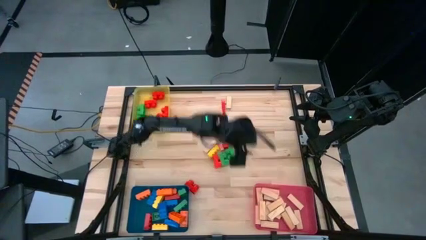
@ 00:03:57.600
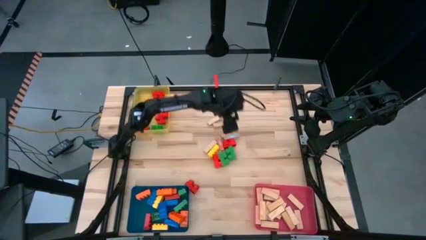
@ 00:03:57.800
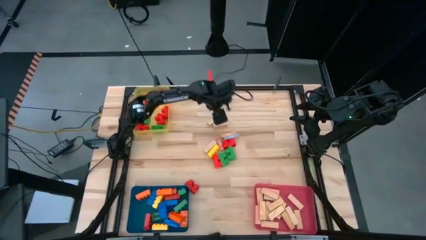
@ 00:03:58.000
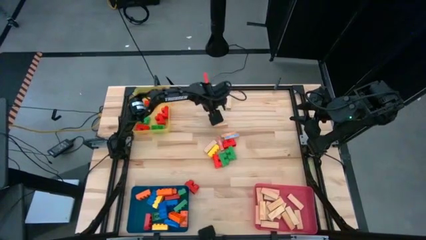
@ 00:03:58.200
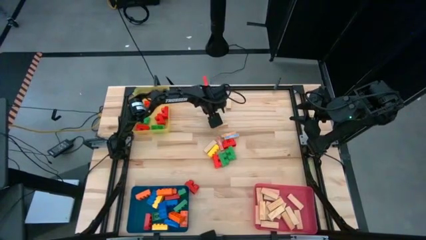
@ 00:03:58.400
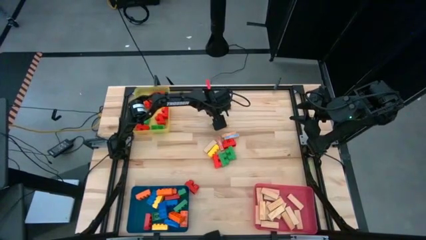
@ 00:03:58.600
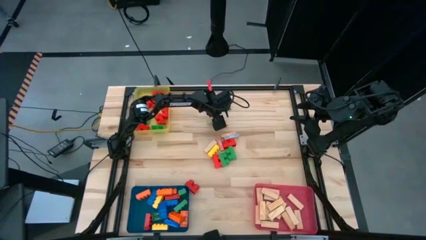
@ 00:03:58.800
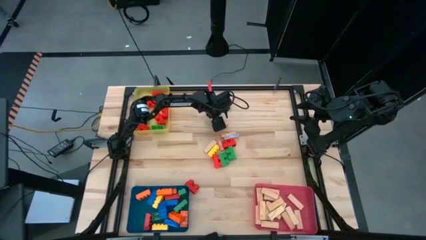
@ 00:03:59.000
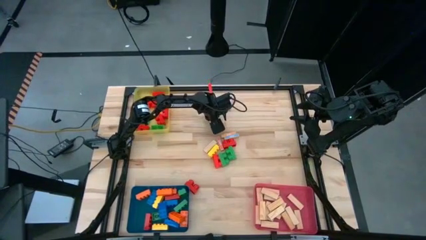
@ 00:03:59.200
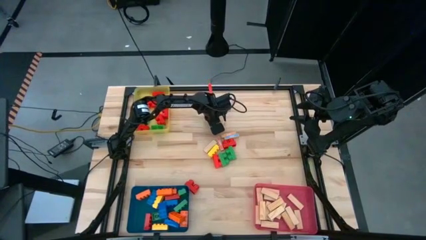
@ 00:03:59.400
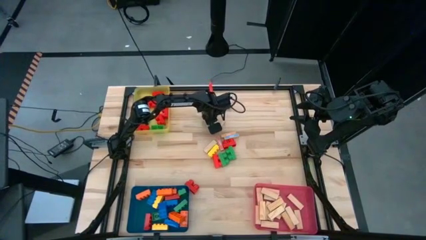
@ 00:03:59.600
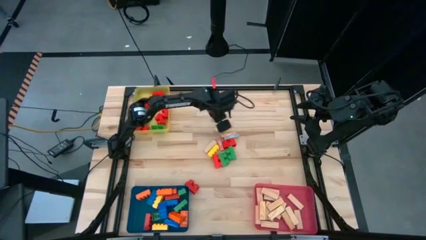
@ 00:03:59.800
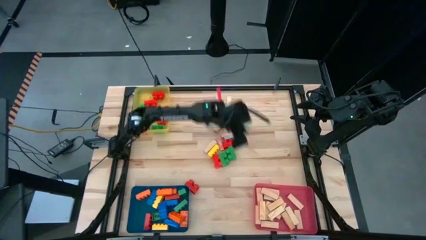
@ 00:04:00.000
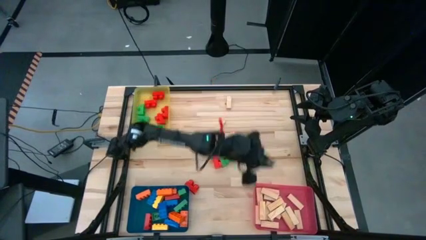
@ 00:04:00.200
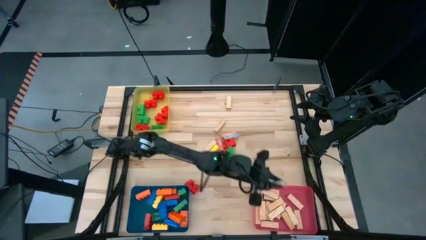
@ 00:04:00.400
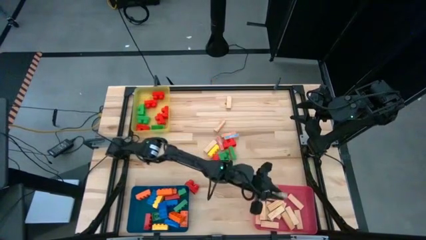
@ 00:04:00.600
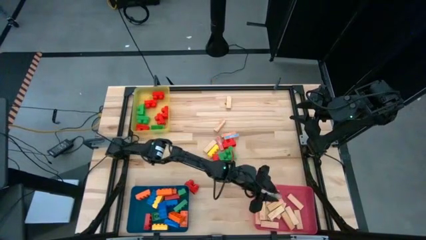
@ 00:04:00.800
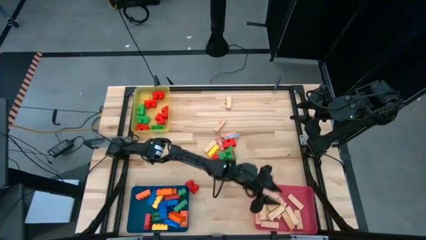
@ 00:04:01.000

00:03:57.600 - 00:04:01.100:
Task: Sort blocks by size
Put the wooden block into the red bin

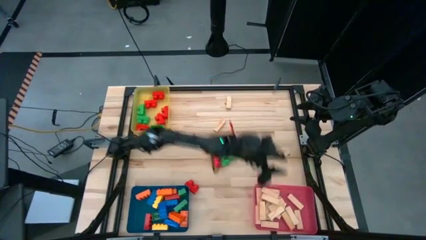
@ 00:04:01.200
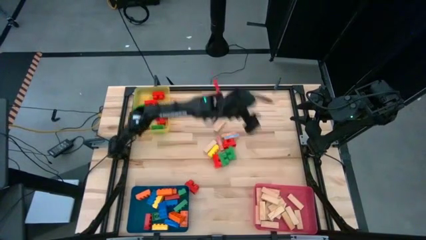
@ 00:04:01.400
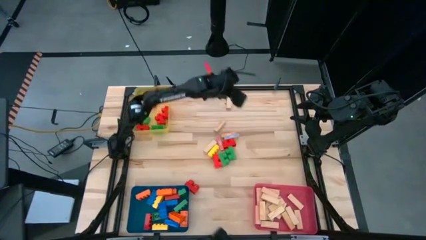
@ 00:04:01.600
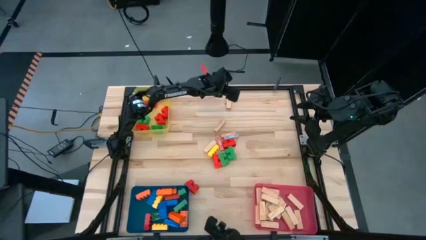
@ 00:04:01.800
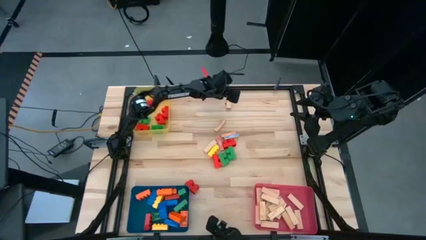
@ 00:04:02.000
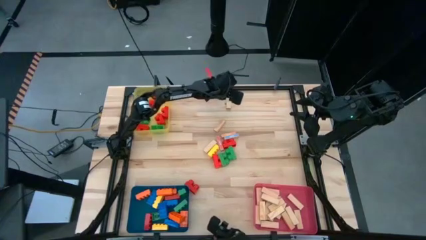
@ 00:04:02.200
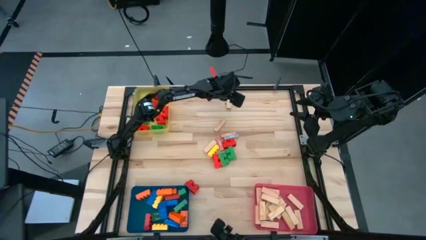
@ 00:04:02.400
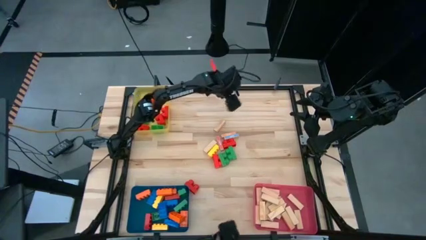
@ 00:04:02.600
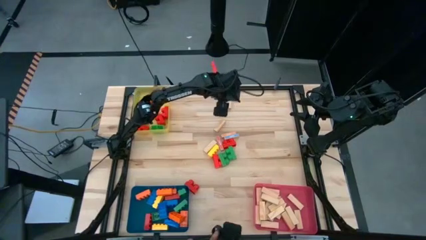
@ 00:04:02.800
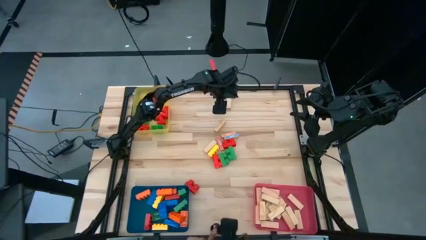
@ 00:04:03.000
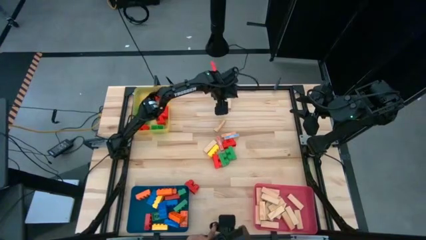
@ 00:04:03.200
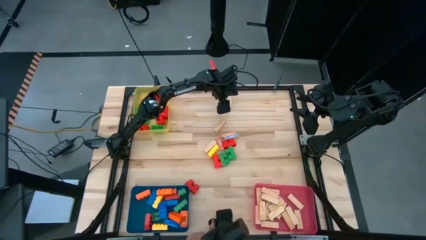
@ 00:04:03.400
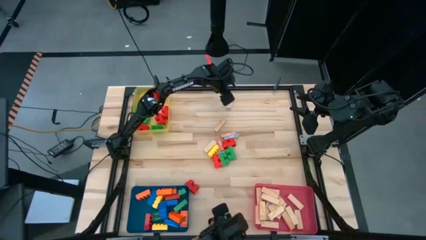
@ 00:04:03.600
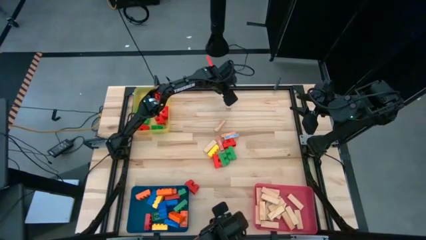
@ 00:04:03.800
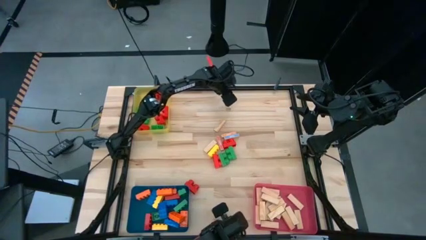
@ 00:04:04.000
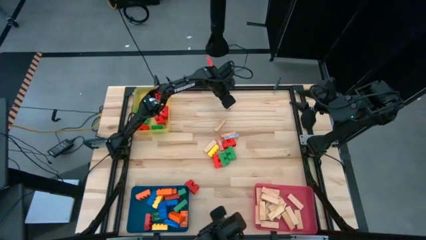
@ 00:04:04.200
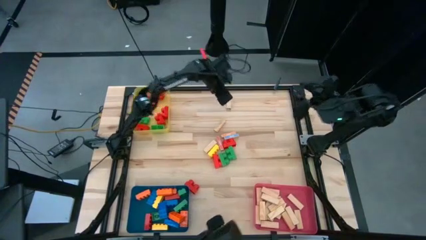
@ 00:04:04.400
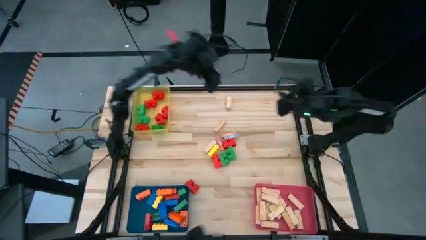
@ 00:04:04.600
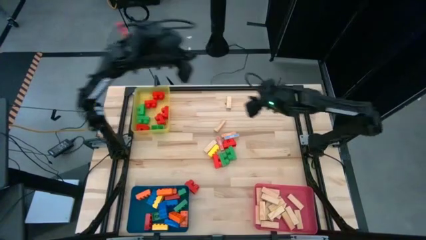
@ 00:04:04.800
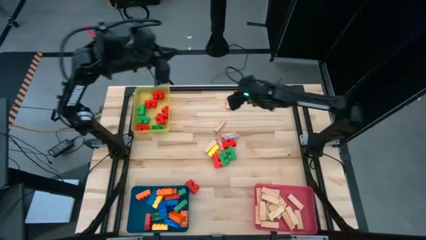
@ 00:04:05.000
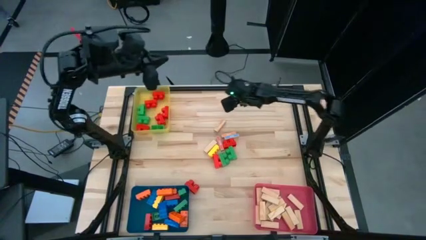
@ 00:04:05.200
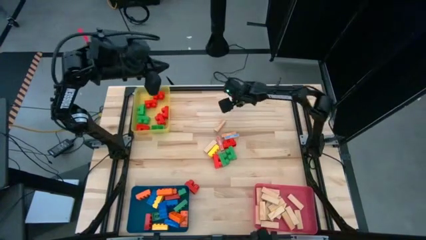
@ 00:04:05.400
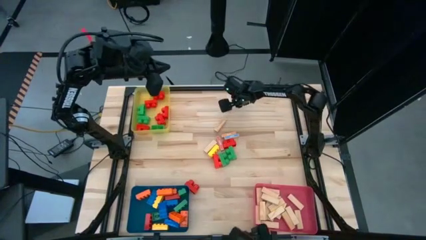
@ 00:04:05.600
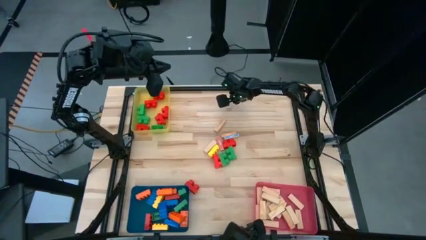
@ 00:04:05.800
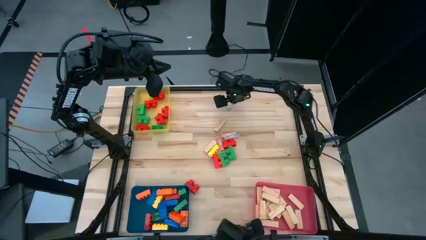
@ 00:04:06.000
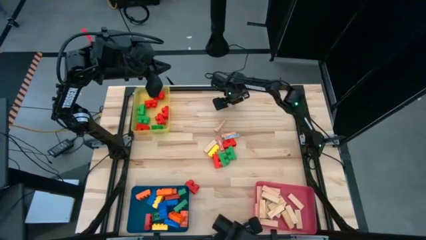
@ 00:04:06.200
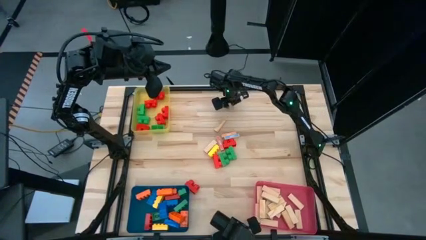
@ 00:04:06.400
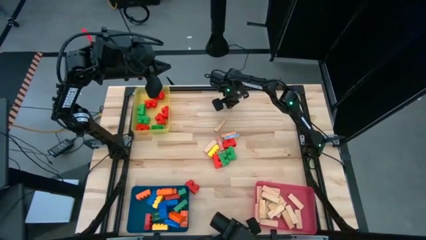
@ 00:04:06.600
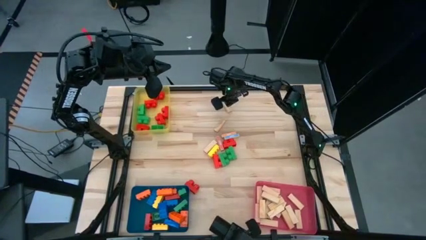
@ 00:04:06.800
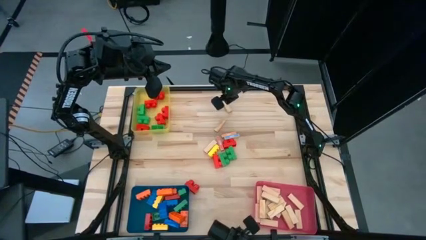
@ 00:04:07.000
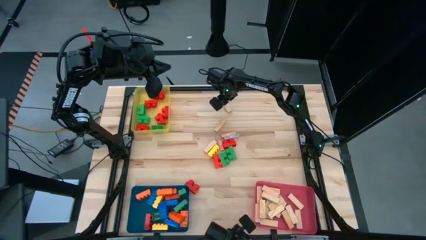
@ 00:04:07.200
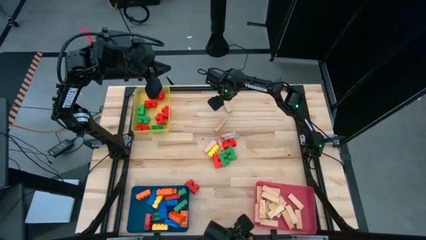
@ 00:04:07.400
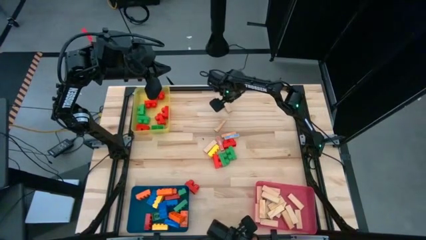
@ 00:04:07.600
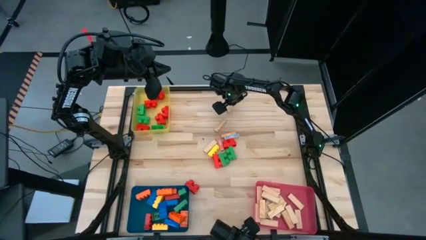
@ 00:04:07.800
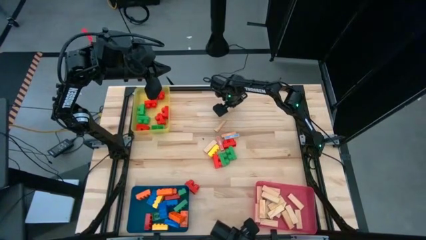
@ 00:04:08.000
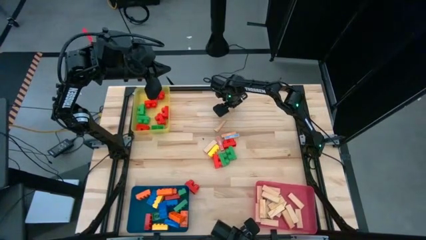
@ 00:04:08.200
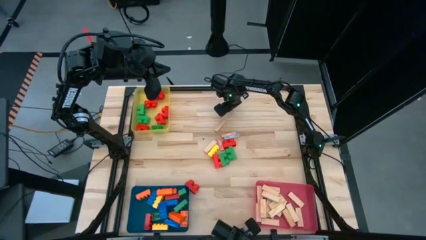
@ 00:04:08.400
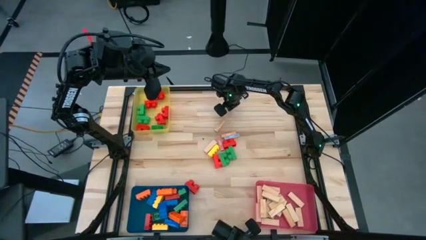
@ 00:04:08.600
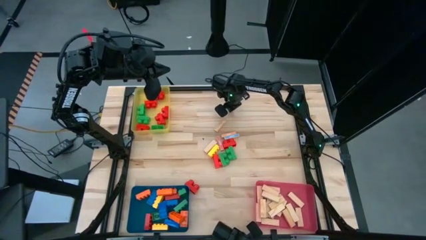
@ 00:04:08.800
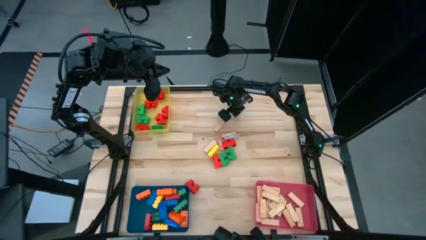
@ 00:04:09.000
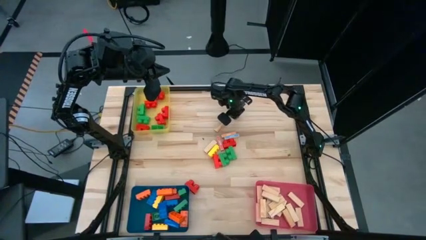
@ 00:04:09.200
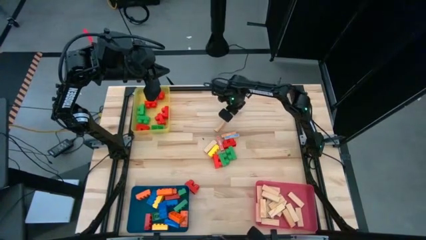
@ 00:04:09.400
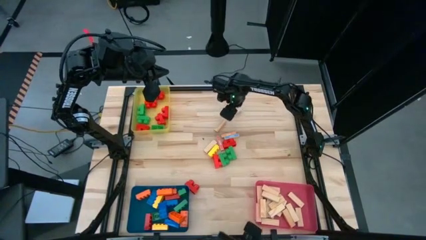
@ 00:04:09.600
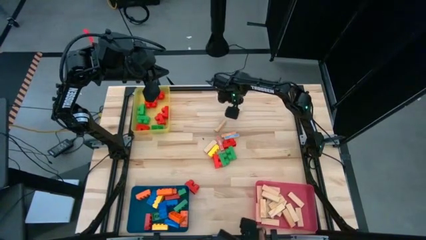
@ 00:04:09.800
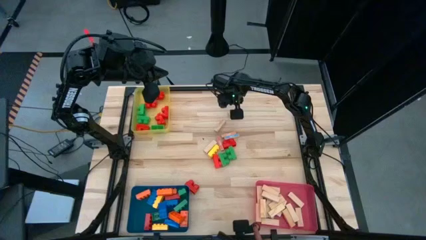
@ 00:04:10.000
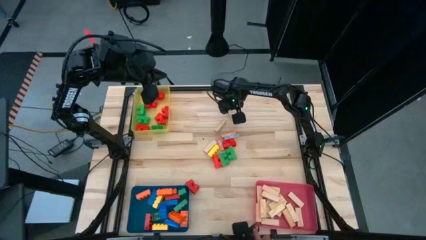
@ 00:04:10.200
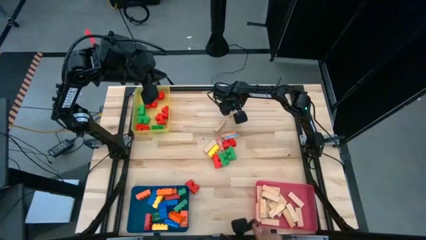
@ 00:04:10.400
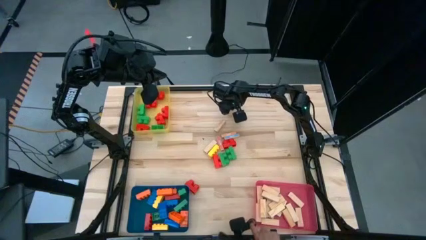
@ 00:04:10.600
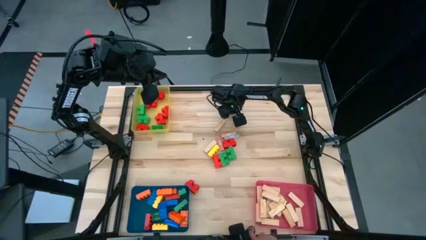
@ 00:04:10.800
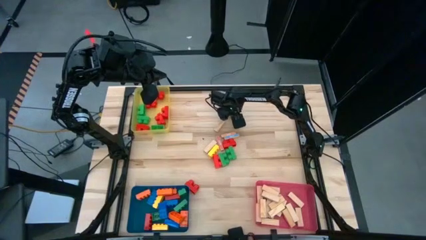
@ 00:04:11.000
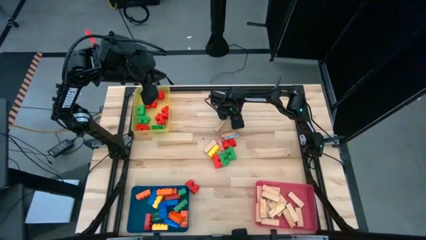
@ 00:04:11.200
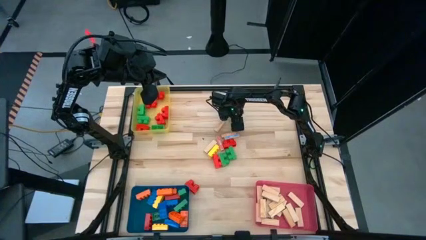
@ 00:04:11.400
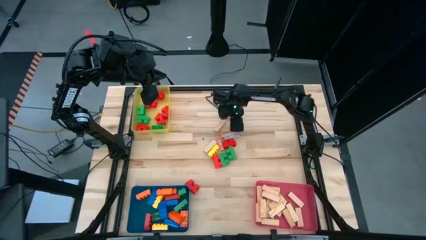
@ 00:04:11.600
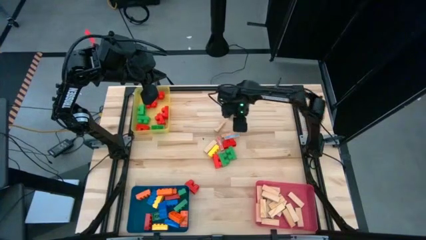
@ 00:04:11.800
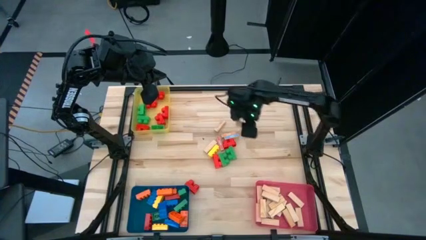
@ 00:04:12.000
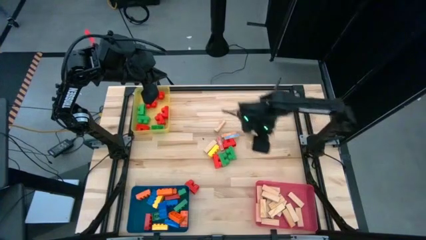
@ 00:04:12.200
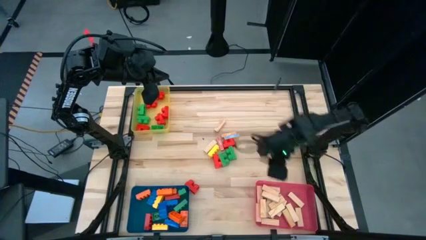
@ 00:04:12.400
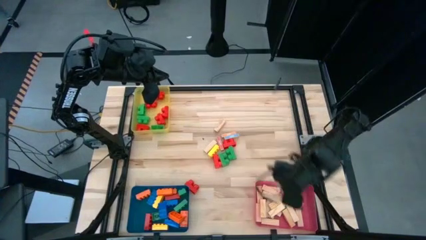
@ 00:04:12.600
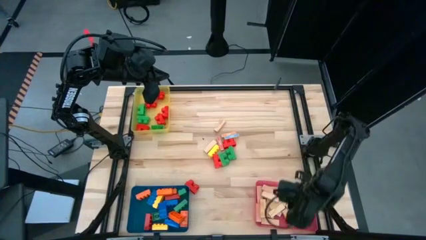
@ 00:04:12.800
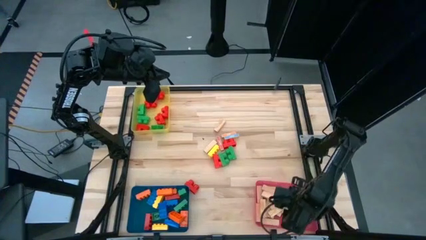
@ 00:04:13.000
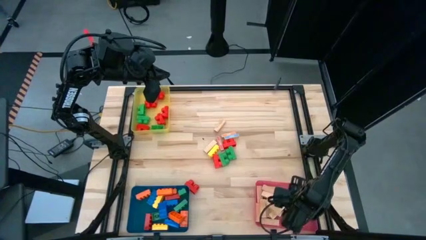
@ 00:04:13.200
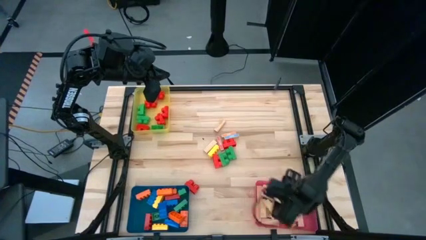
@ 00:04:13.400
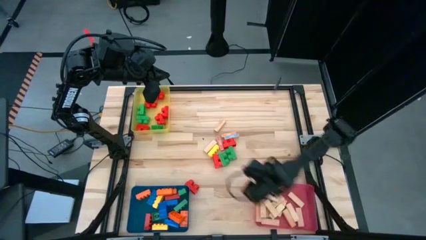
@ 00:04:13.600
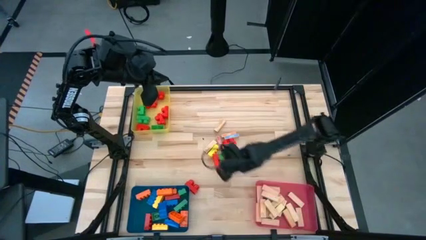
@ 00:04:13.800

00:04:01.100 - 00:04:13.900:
Put the wooden block into the red bin
